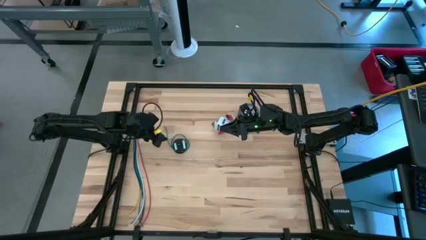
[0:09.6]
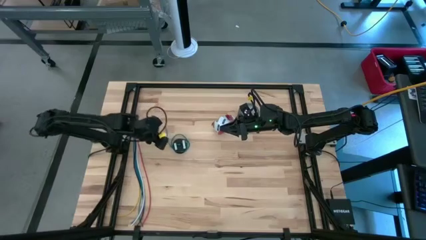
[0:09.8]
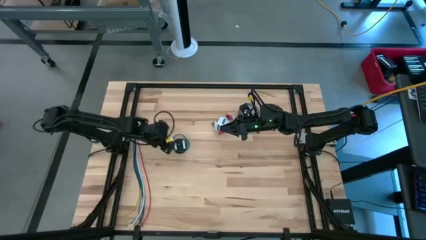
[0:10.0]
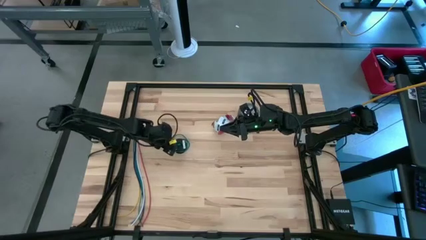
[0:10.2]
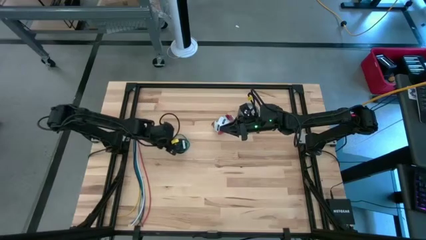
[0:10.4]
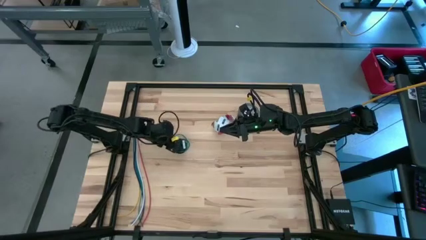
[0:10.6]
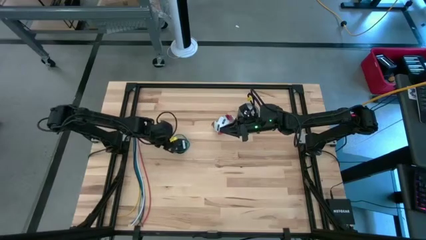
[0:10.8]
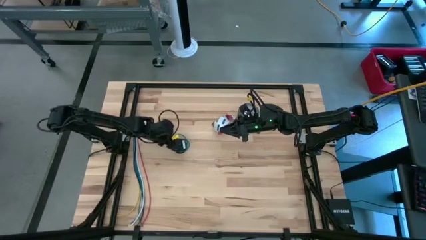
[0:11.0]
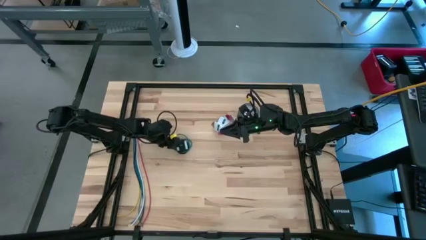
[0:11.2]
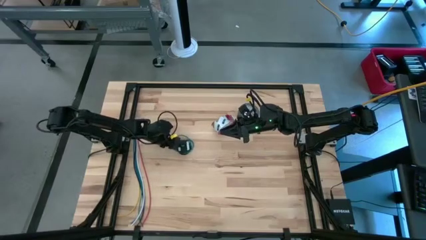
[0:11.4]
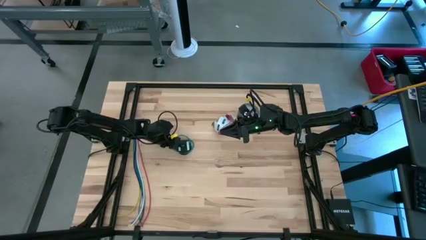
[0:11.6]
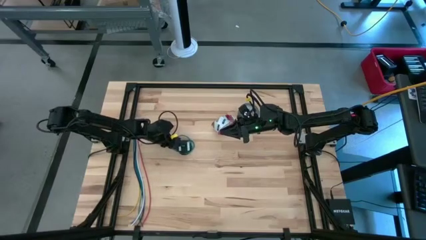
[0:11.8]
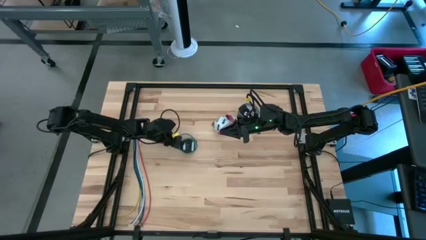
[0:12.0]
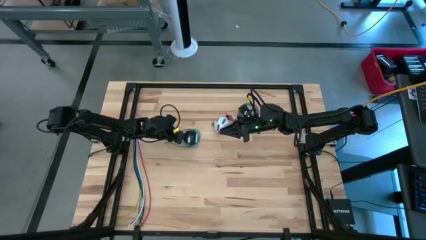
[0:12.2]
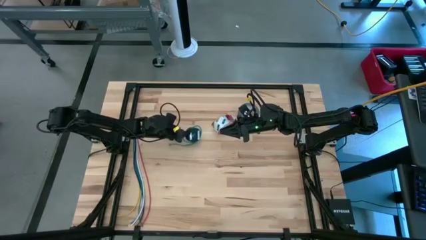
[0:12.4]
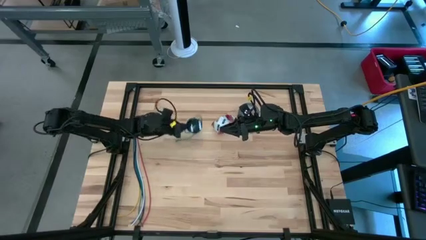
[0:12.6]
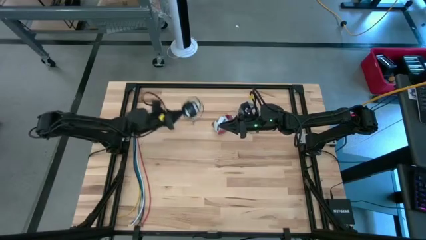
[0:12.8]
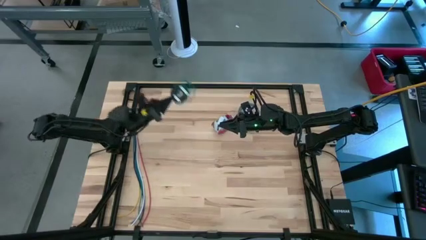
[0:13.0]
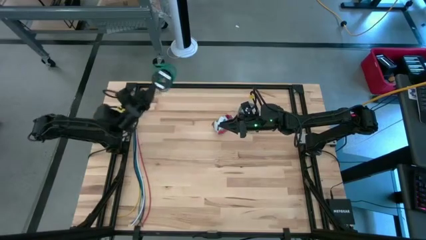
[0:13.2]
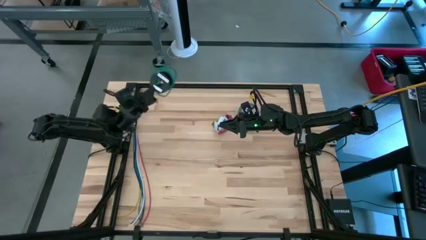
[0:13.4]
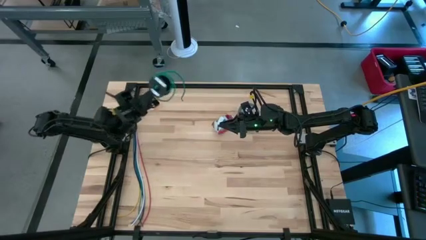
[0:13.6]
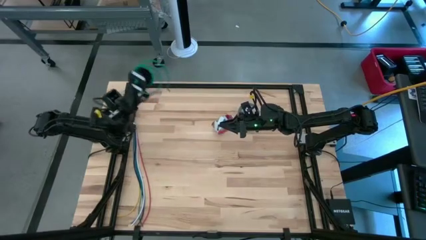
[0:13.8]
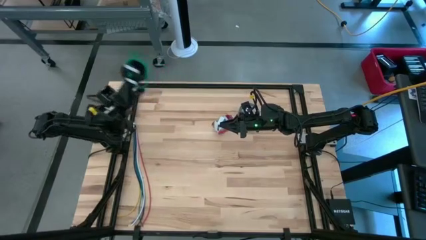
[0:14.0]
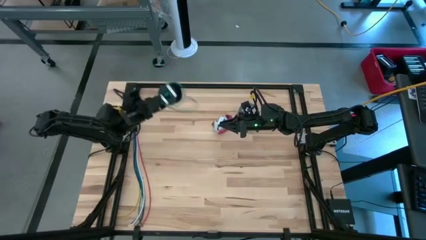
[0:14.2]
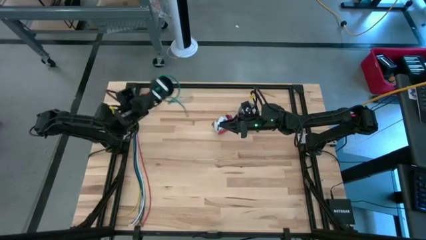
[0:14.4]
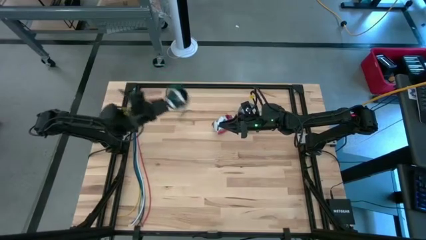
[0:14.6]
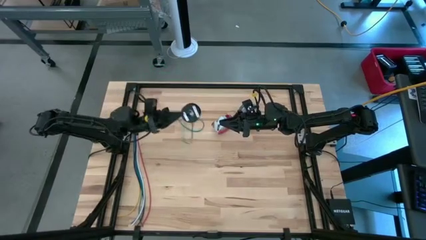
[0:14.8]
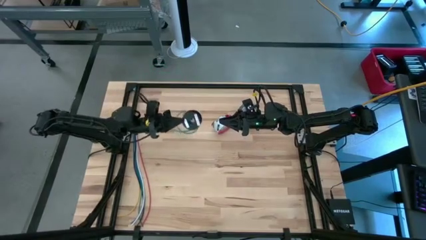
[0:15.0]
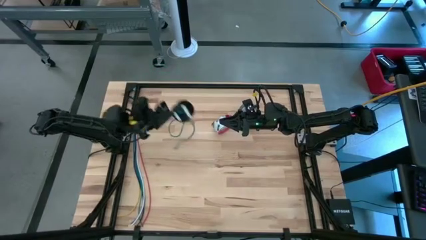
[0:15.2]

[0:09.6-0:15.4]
Task: Coil cords
Uncoil the green wire from the spool

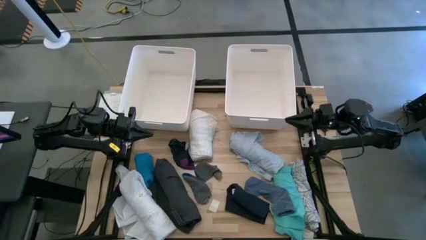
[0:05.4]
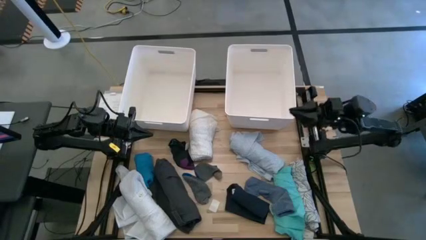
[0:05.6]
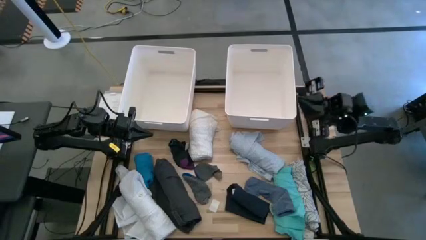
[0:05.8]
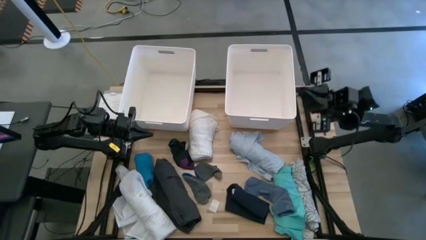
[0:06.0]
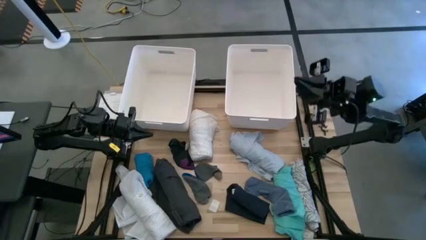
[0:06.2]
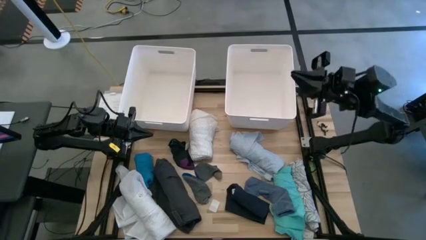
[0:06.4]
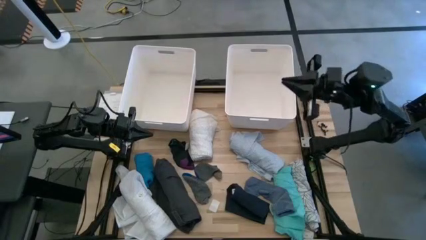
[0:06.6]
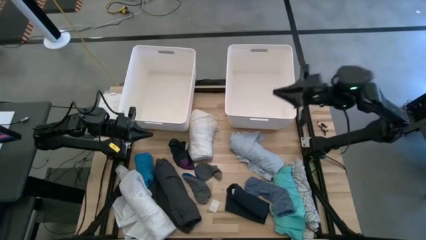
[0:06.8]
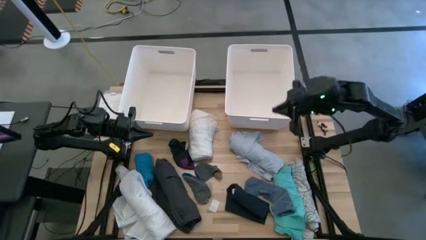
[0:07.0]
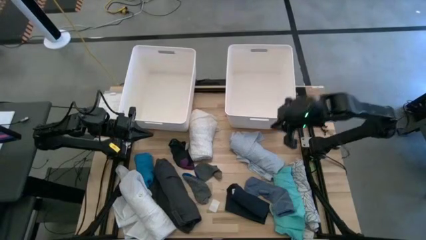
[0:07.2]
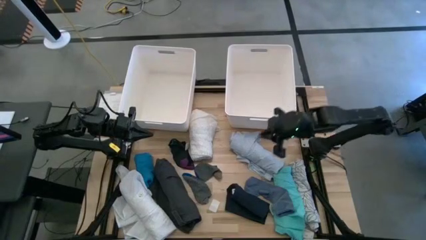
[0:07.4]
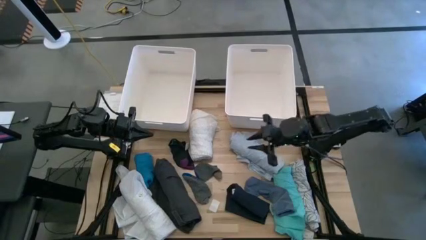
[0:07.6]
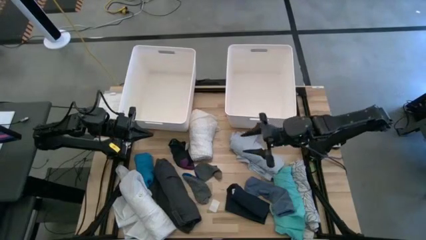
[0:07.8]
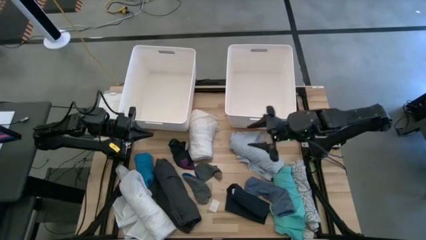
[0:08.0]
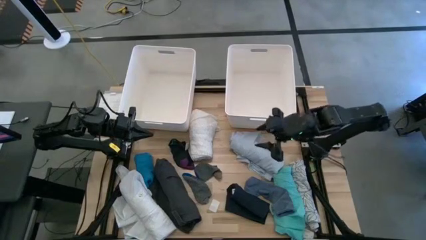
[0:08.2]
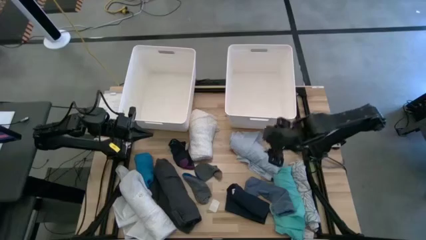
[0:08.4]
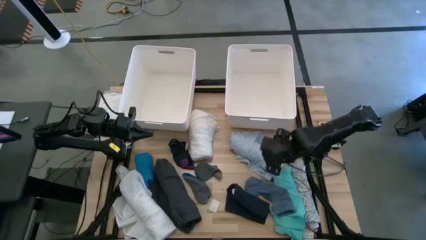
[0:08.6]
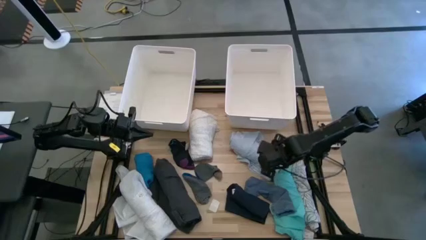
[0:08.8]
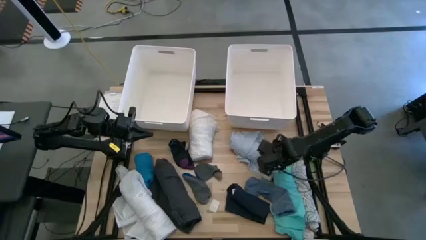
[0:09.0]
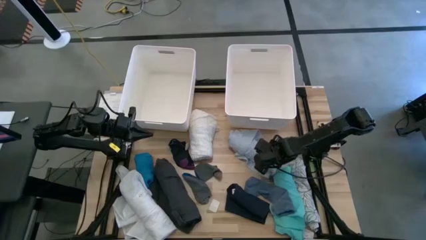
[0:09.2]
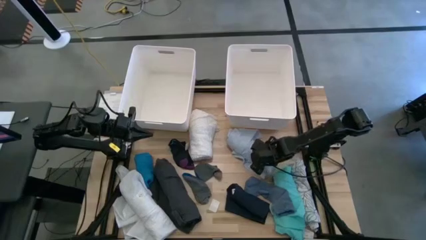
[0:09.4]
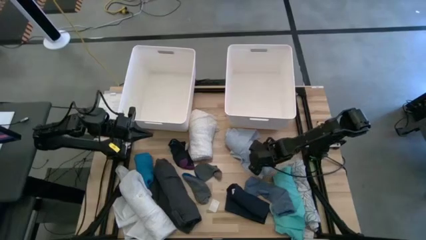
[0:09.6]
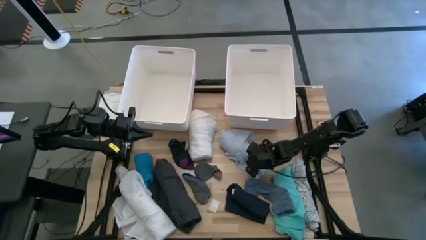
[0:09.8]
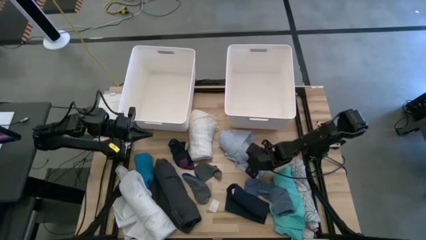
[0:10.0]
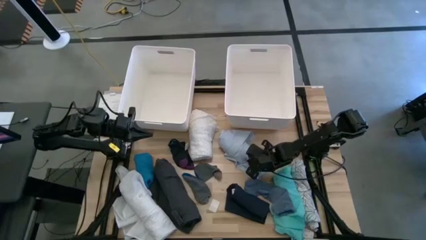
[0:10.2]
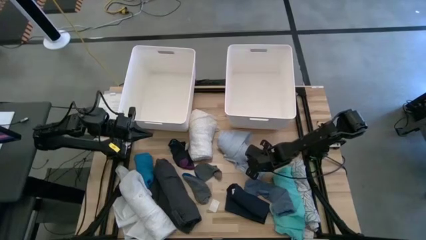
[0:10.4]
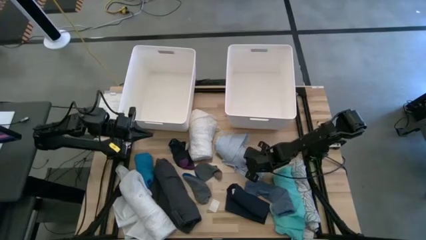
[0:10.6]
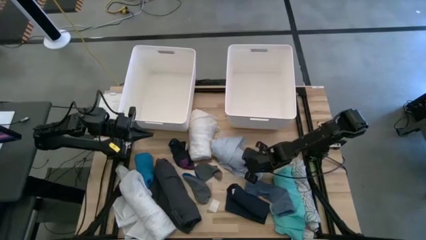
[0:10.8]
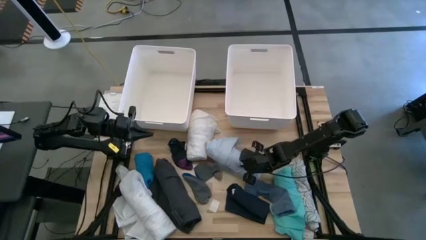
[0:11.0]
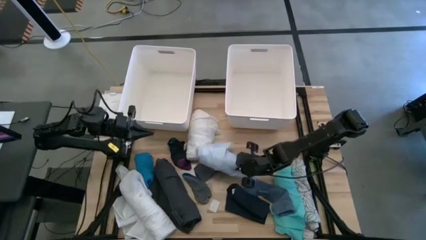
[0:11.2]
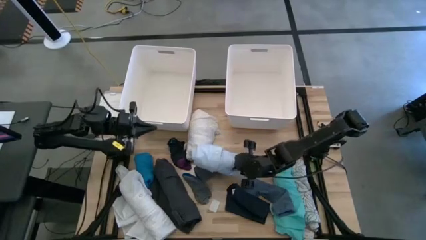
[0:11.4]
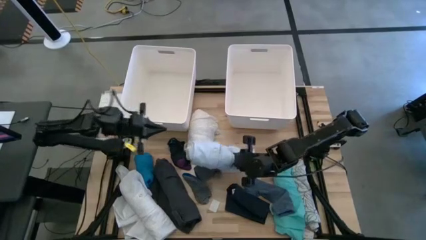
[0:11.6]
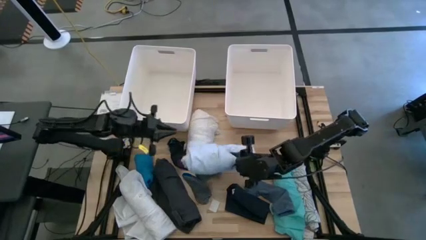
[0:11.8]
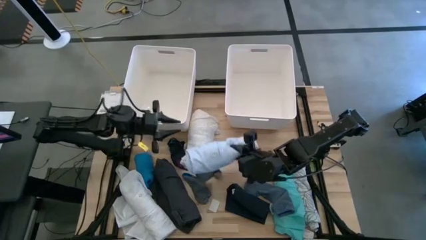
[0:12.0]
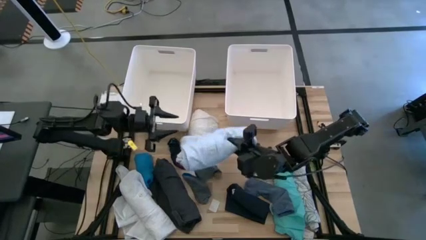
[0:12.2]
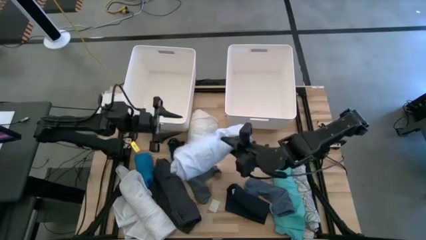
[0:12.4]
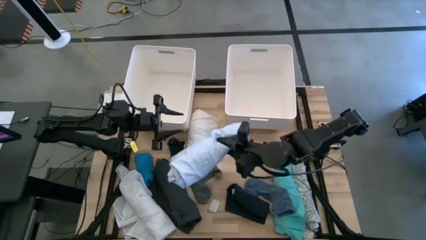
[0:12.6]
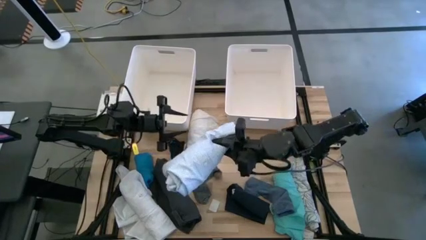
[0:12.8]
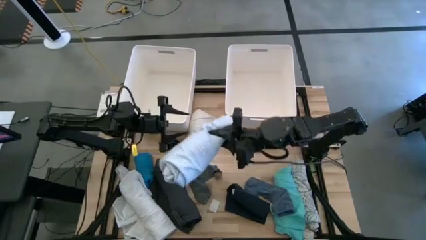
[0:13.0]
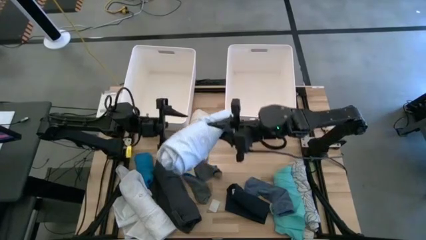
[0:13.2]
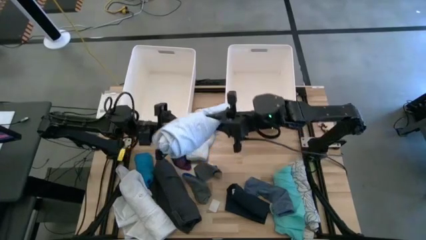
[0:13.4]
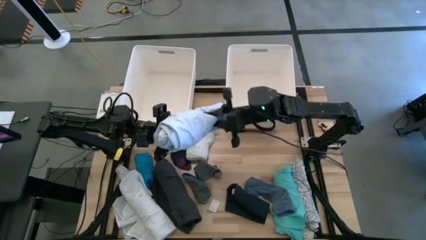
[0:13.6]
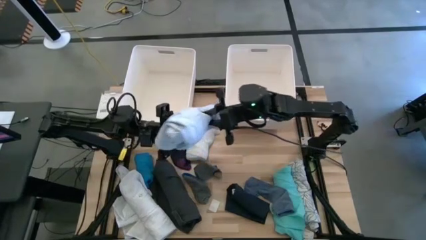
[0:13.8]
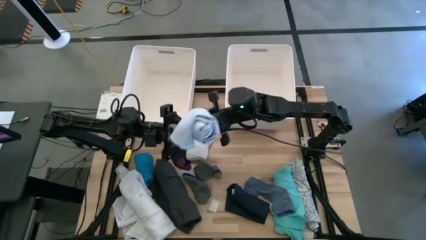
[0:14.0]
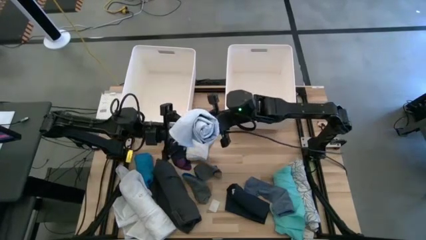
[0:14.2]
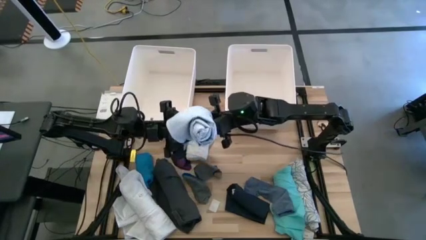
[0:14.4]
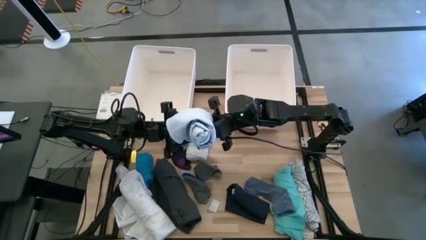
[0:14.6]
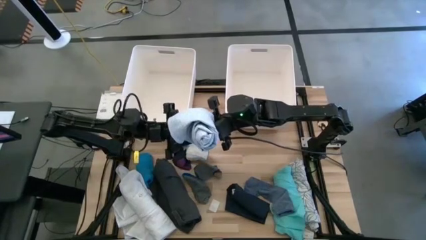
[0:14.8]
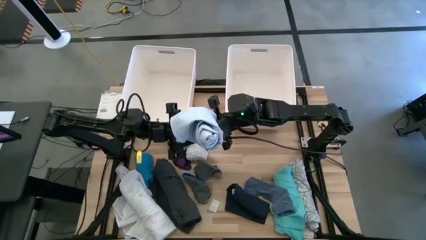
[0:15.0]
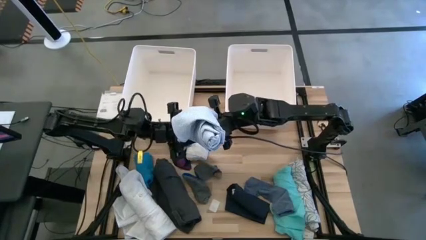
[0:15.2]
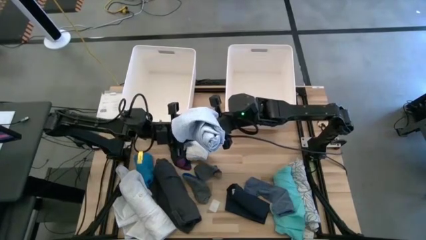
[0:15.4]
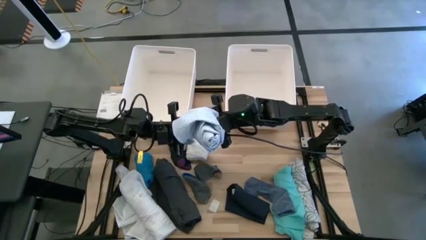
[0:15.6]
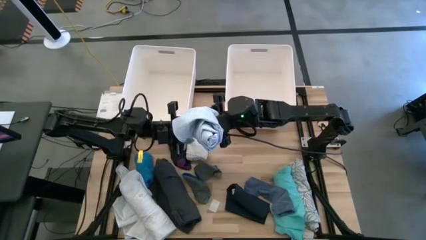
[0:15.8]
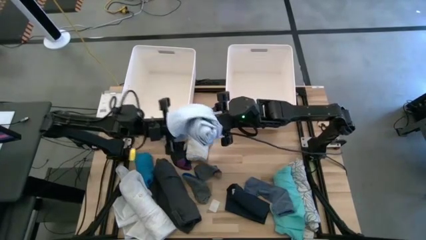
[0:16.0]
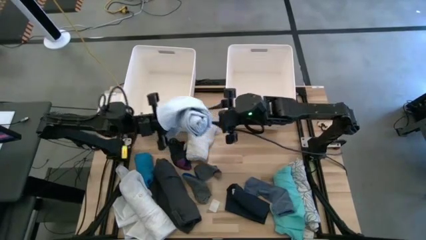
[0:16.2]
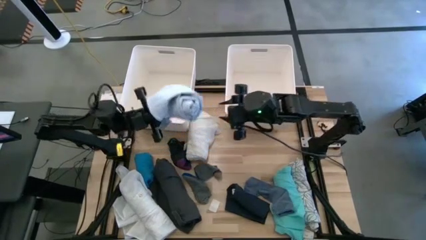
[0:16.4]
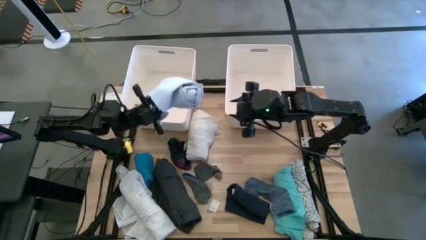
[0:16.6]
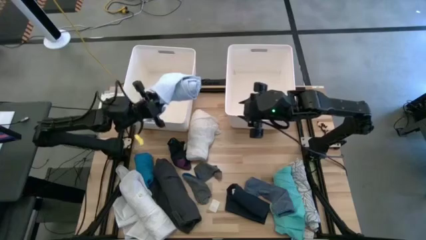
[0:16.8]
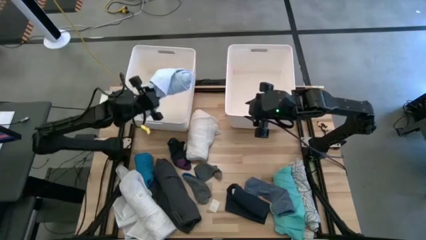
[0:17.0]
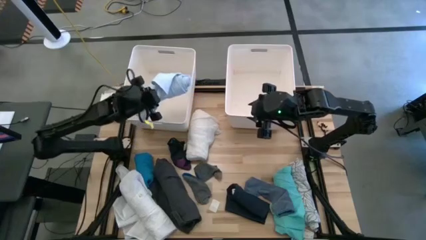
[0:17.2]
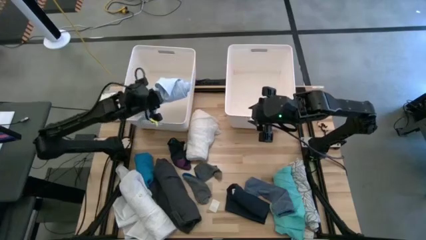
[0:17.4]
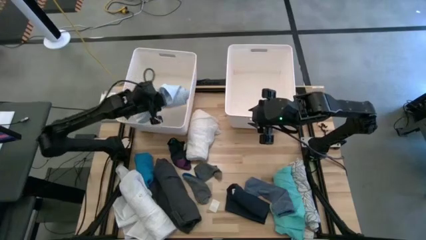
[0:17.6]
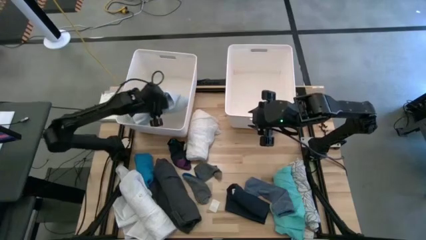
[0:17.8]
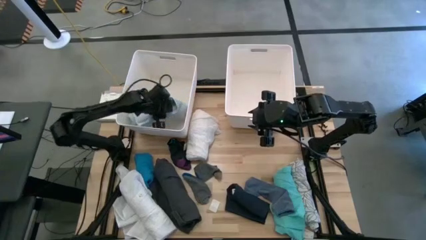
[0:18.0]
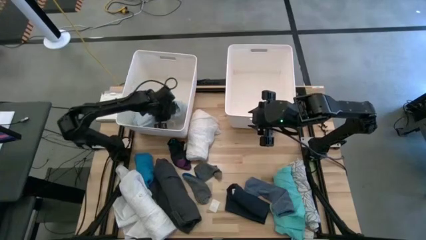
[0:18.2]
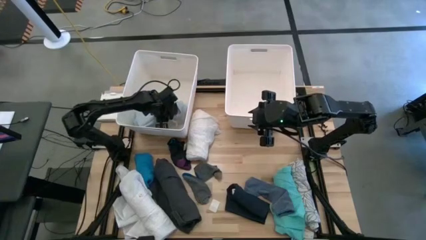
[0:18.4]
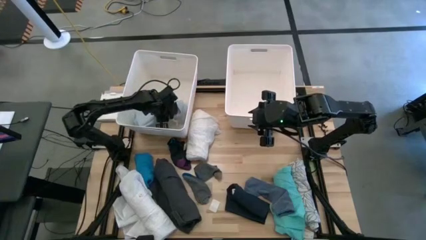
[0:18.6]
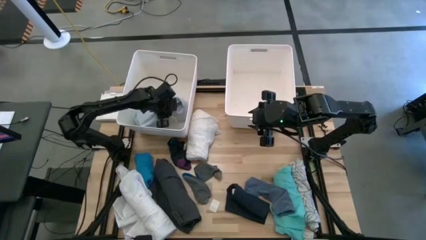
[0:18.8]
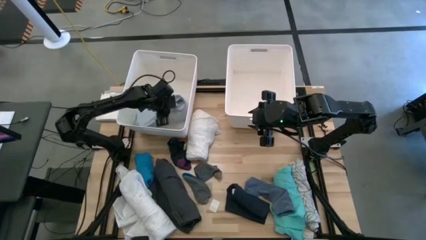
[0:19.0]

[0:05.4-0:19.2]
Task: Sort clothes
Put the rolled light blue polo shirt into the left white bin
